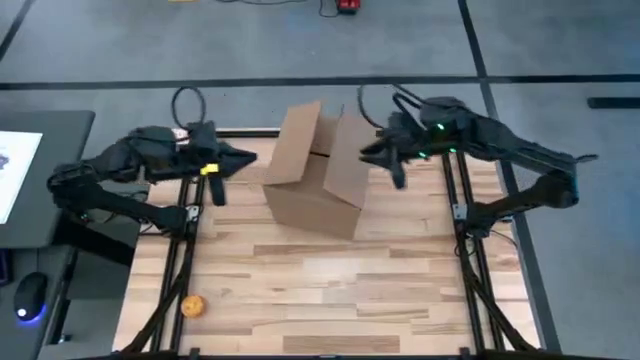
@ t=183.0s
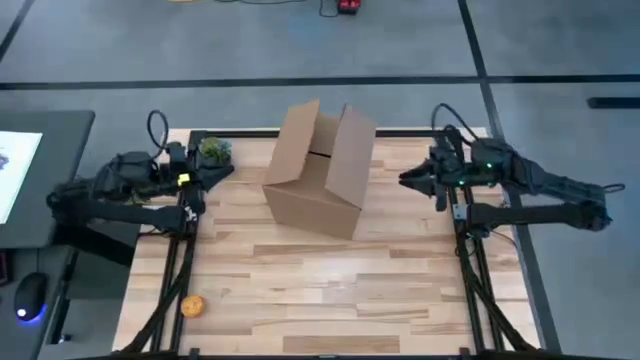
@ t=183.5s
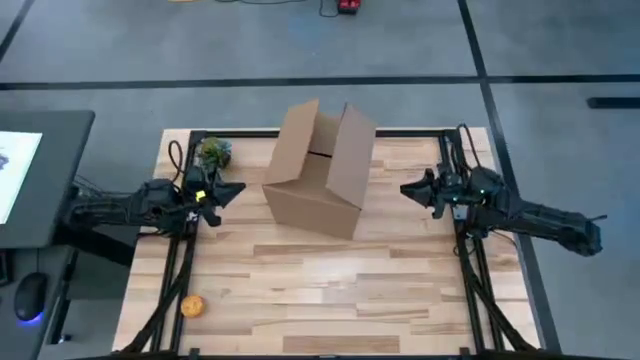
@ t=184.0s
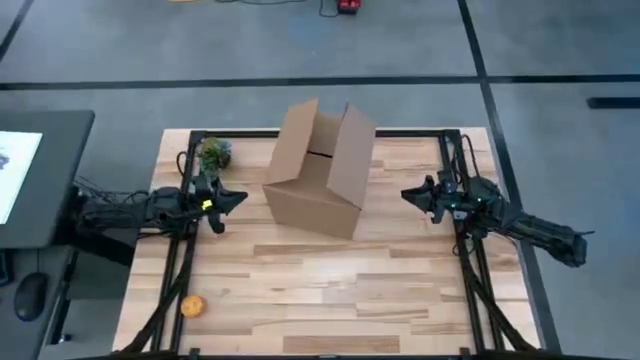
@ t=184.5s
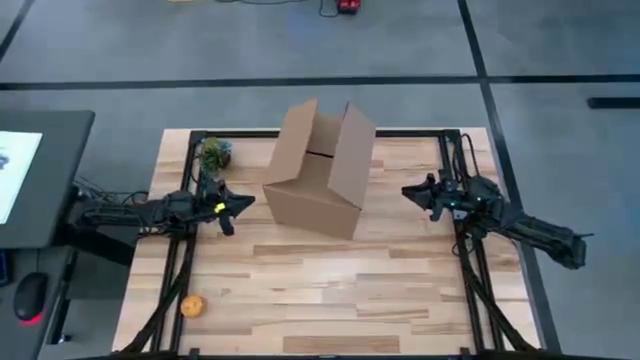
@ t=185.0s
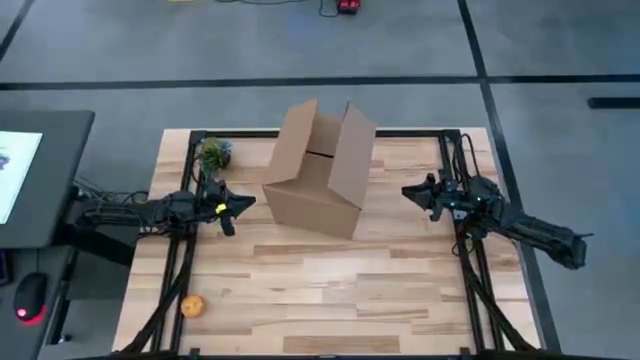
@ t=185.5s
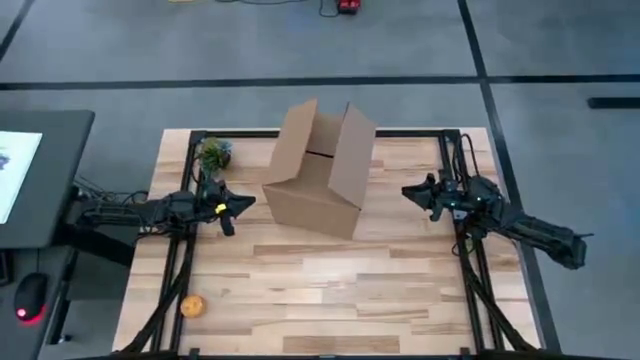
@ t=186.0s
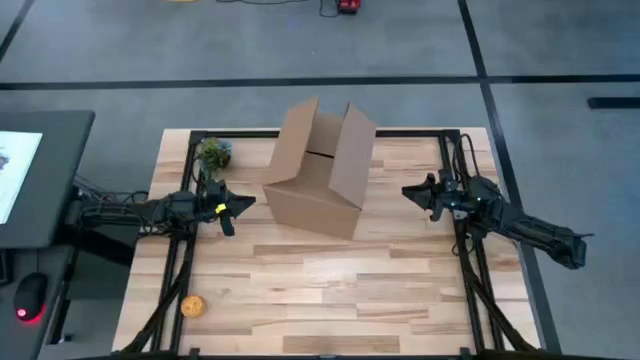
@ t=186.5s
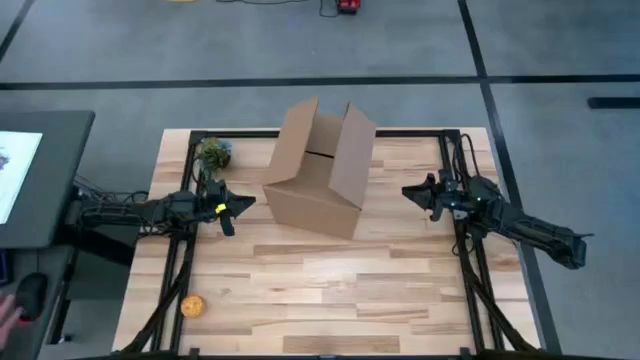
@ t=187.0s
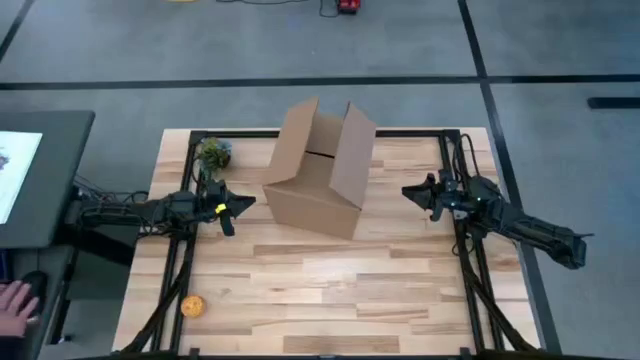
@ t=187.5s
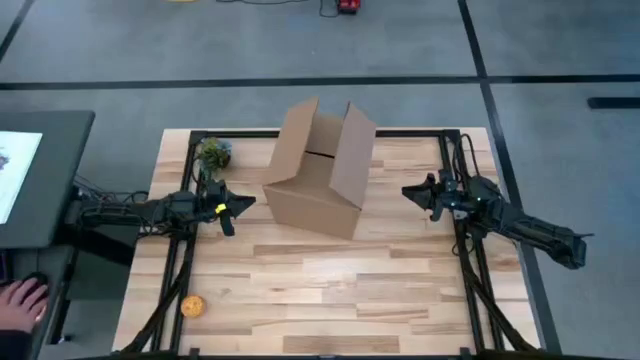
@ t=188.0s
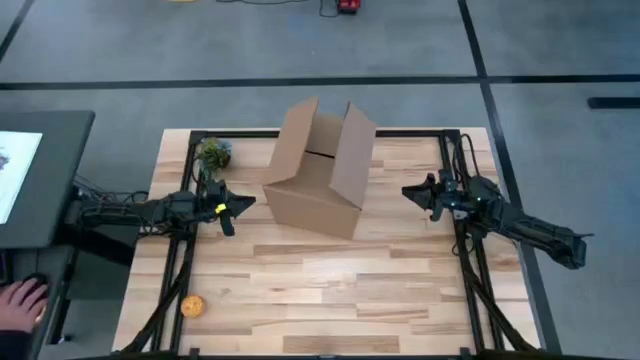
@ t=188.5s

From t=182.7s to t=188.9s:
Task: wrap mug
Return to Home Position

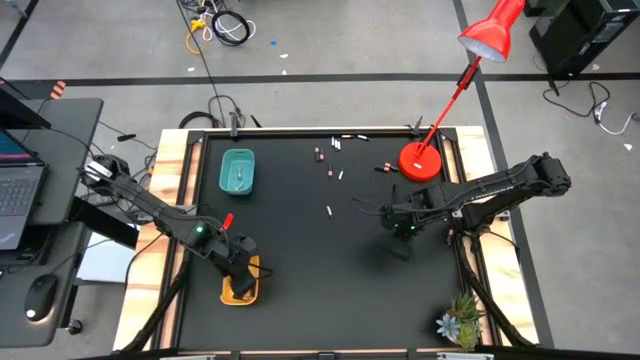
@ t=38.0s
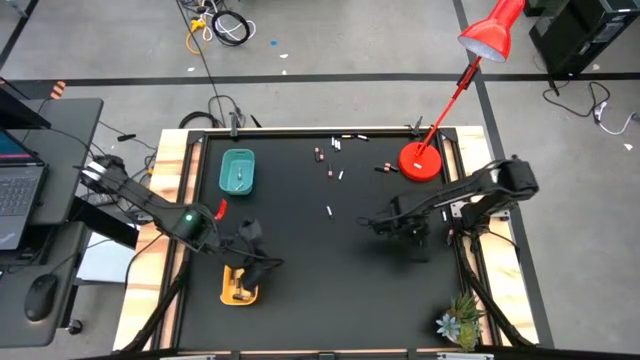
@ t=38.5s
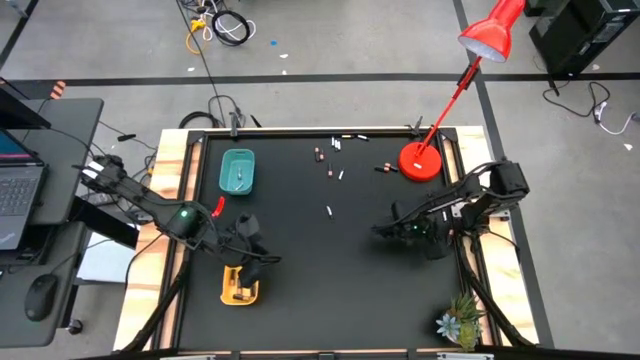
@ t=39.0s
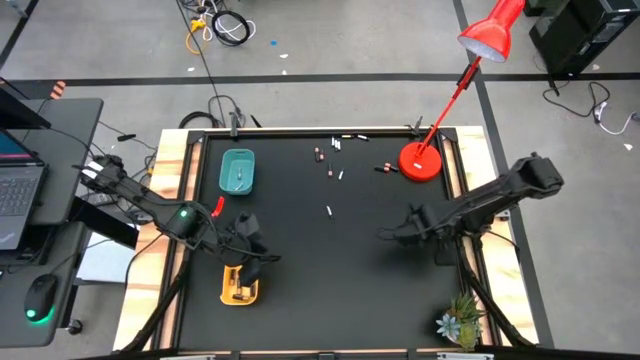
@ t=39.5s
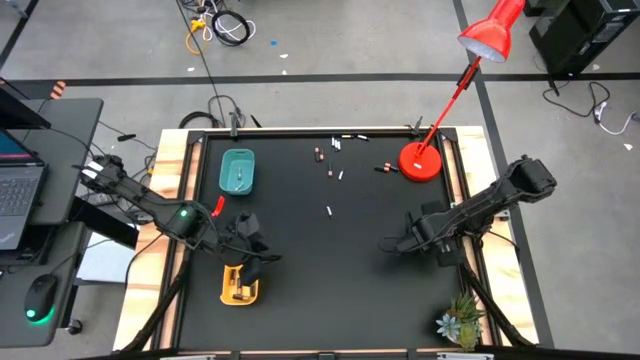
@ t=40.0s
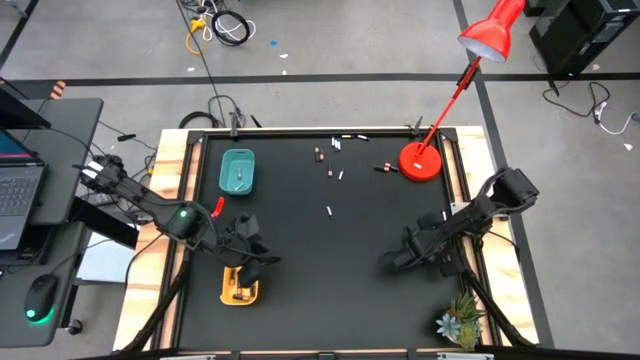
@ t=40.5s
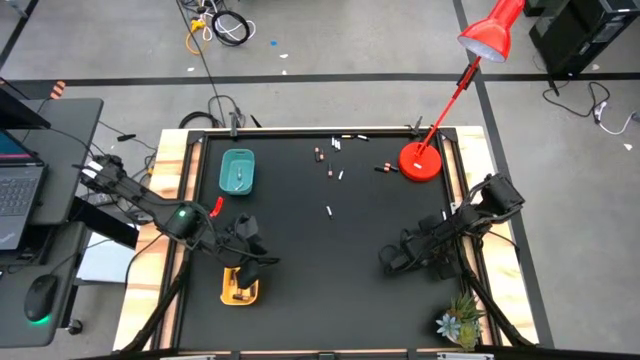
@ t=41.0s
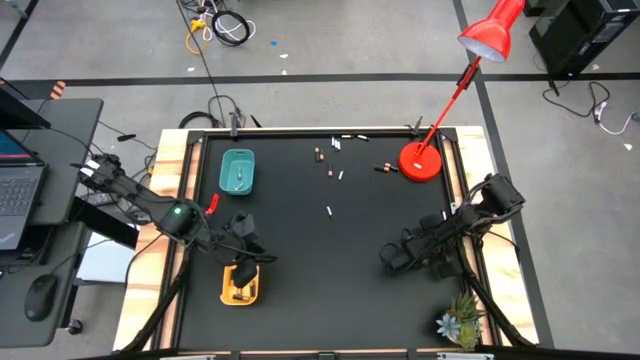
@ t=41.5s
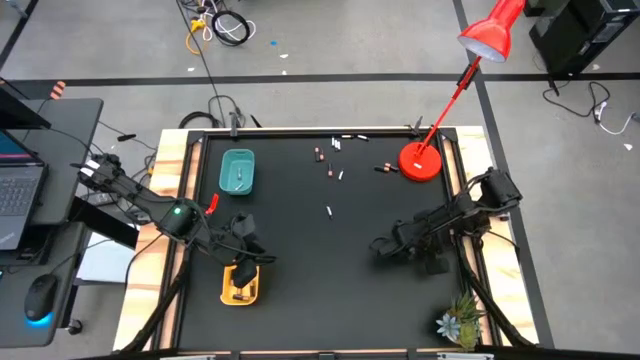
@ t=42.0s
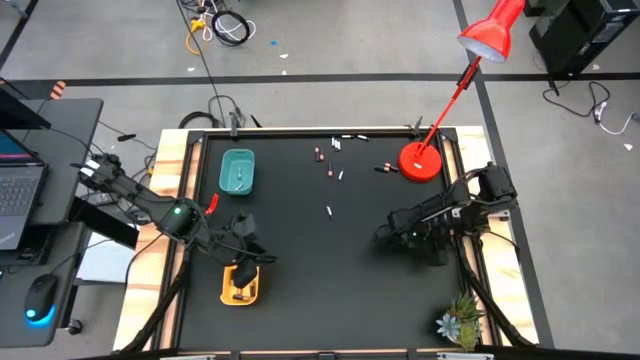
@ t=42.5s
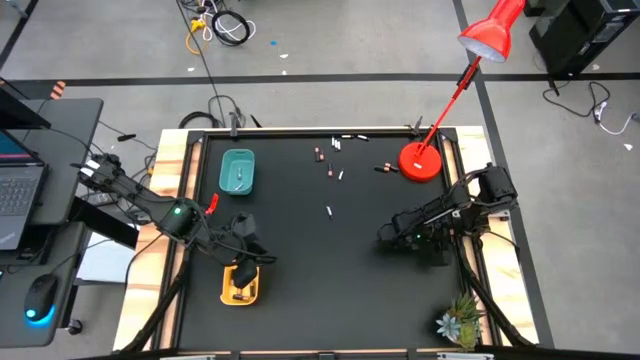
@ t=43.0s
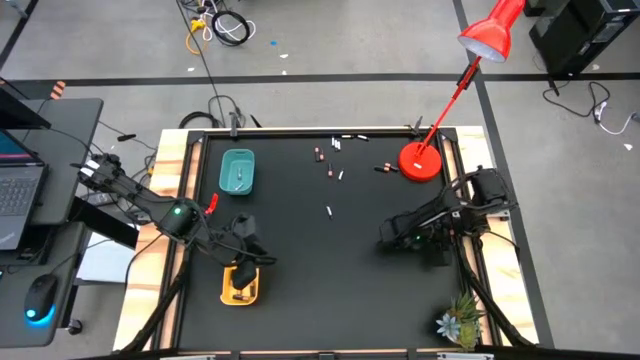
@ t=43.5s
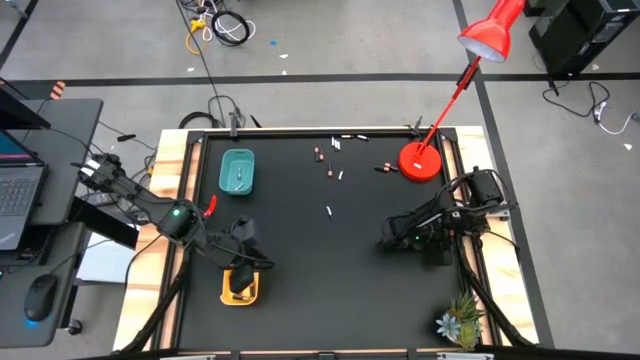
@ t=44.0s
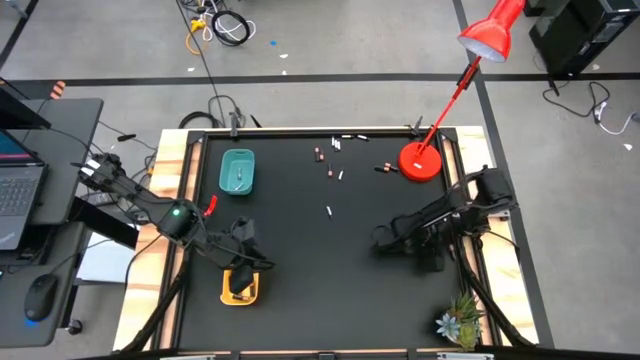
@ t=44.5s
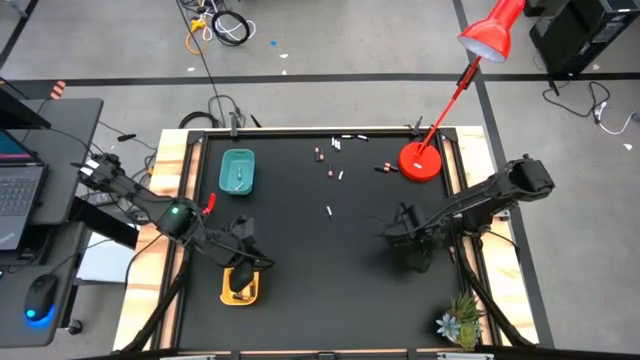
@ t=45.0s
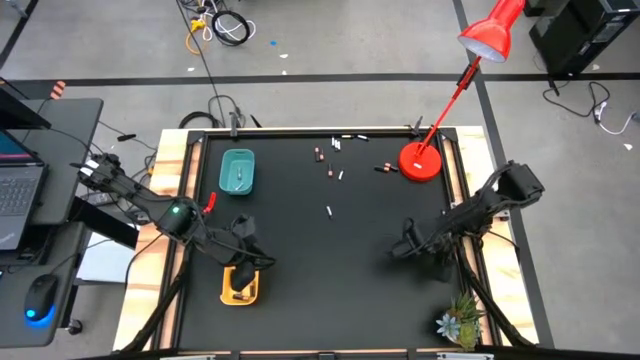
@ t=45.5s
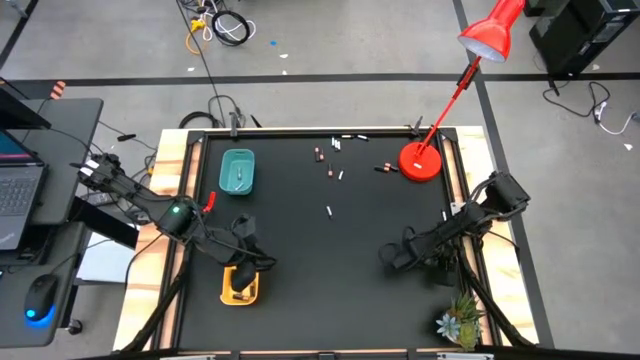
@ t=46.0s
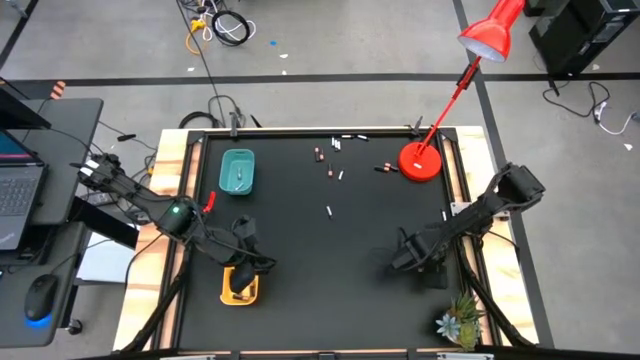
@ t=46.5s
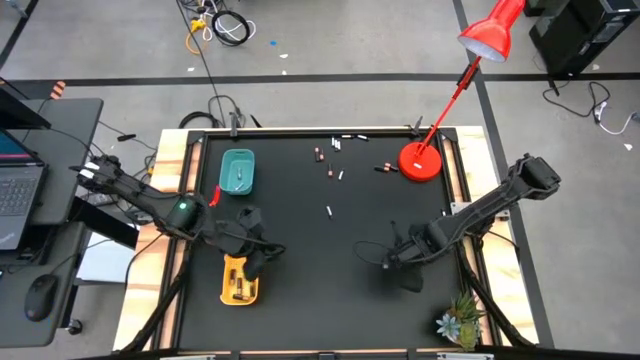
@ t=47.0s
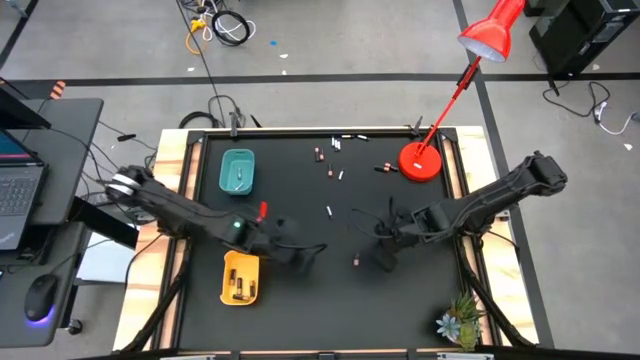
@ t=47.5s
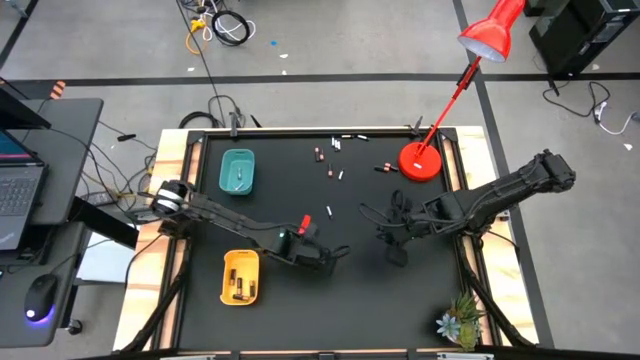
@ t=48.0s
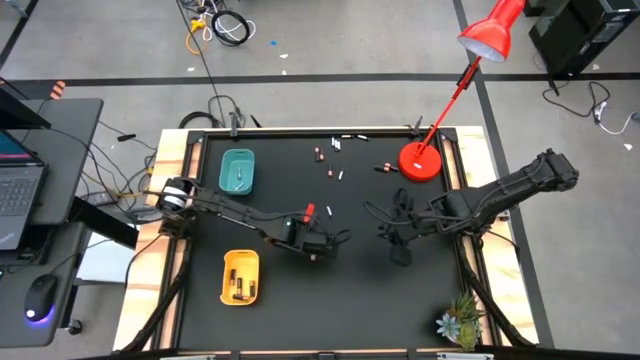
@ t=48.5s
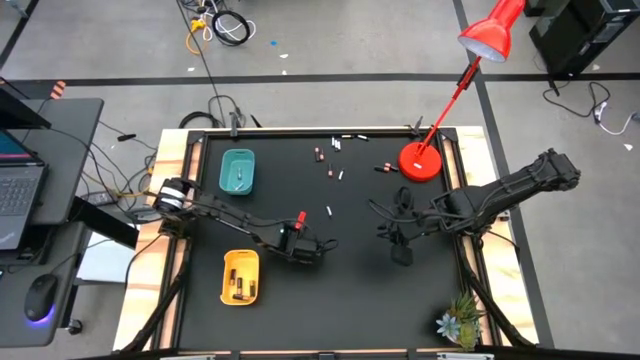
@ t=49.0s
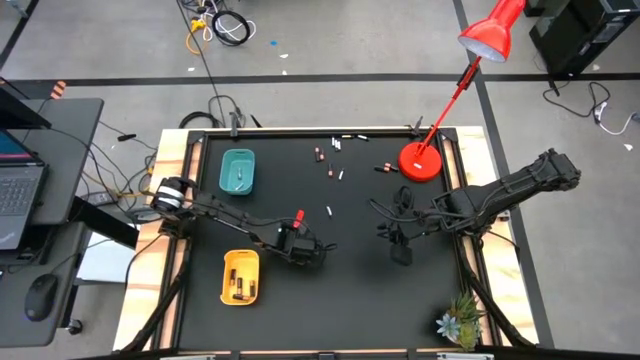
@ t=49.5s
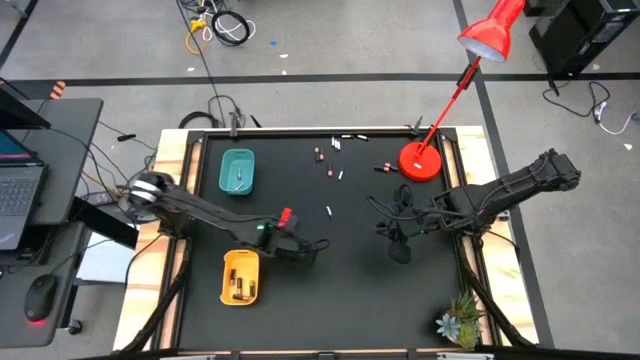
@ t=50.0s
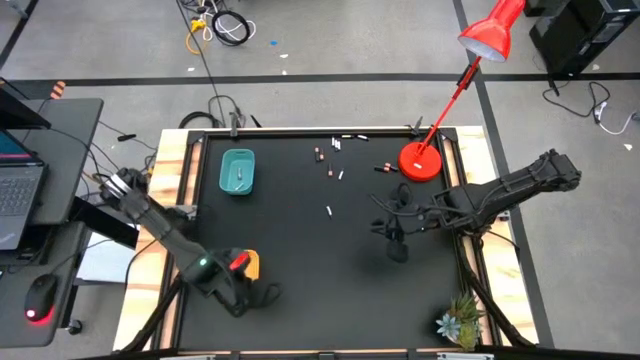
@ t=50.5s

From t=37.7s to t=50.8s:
Task: Sort batteries
Put the black battery into the yellow bin
